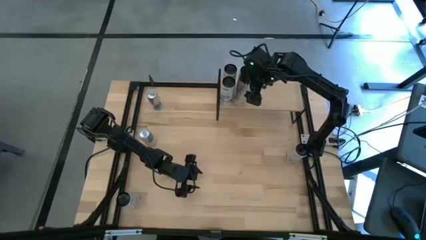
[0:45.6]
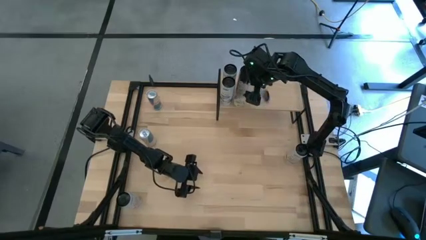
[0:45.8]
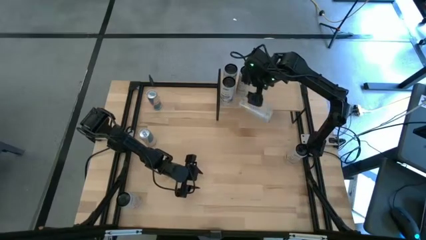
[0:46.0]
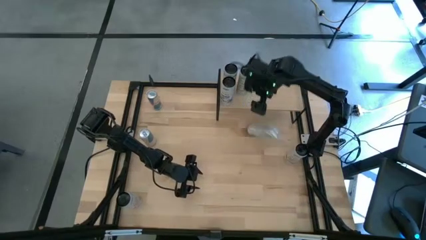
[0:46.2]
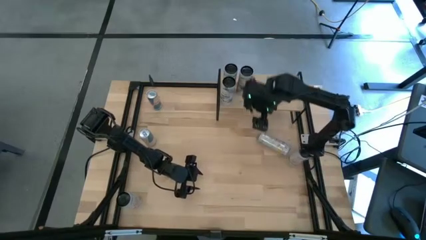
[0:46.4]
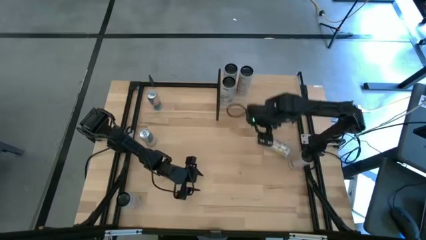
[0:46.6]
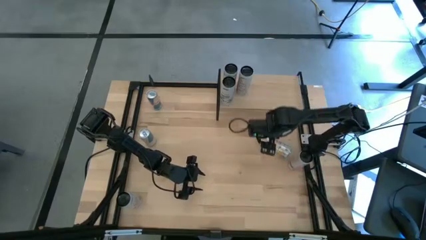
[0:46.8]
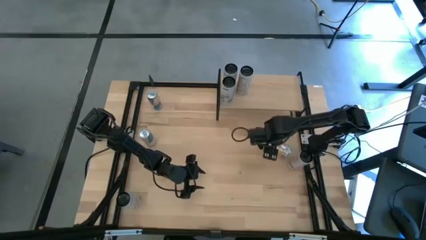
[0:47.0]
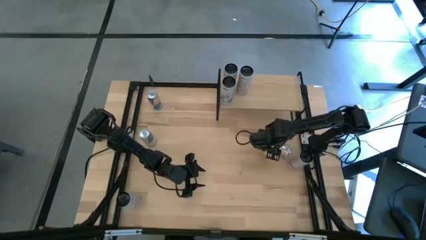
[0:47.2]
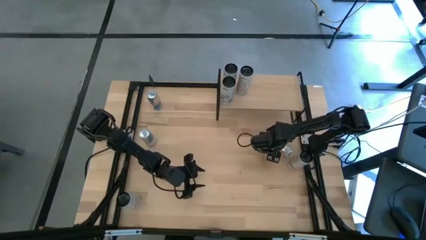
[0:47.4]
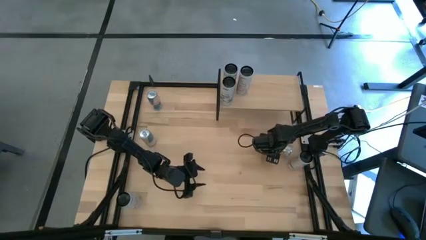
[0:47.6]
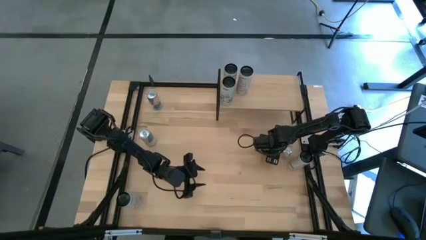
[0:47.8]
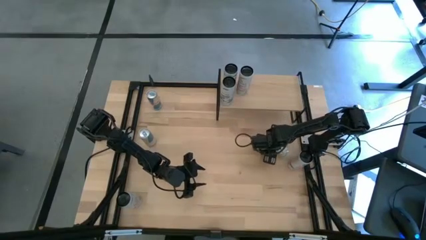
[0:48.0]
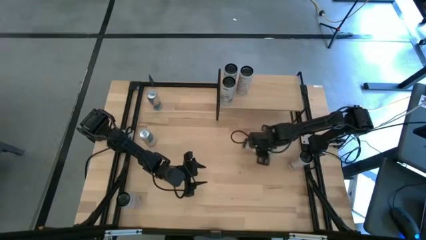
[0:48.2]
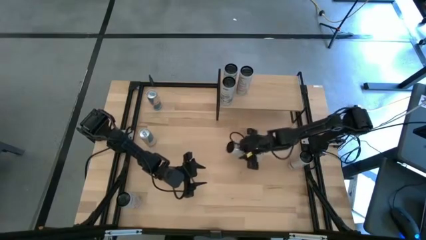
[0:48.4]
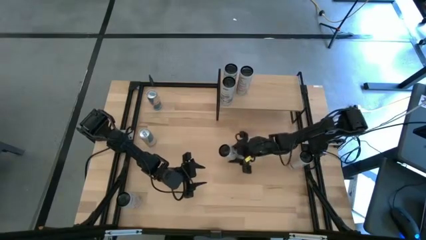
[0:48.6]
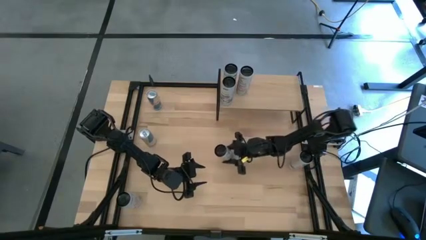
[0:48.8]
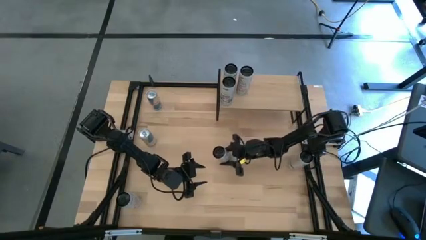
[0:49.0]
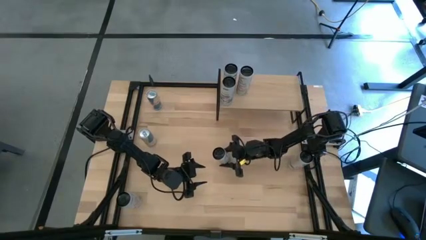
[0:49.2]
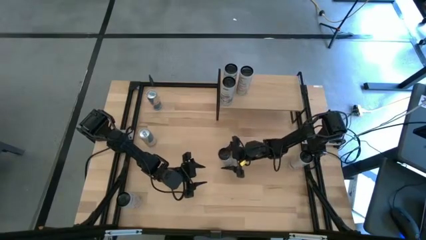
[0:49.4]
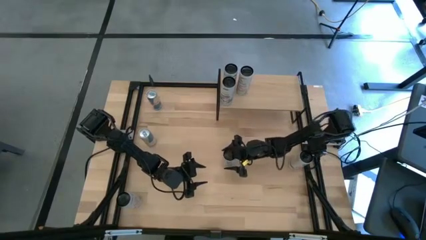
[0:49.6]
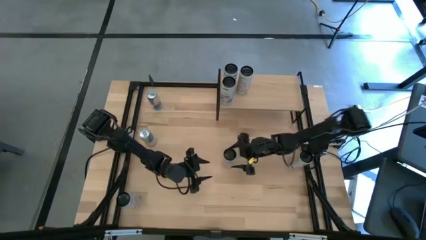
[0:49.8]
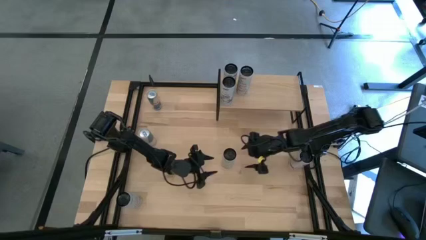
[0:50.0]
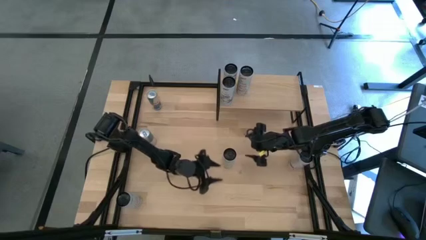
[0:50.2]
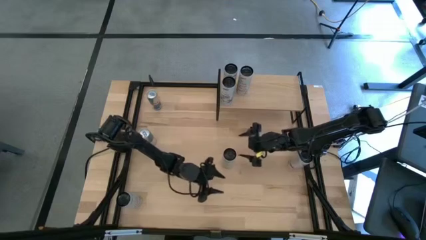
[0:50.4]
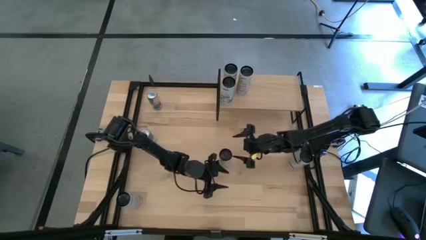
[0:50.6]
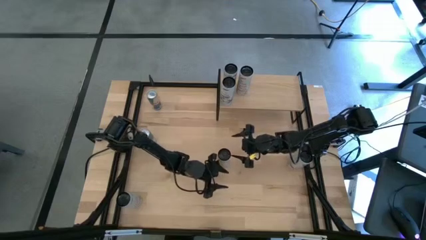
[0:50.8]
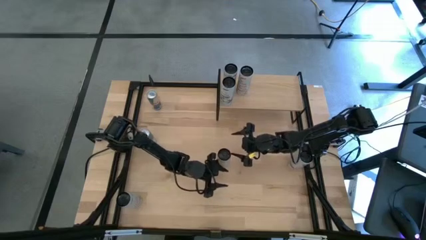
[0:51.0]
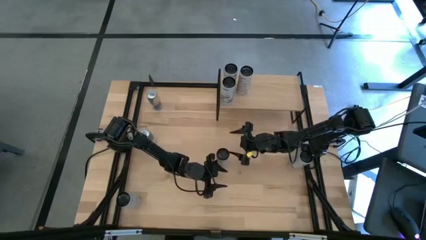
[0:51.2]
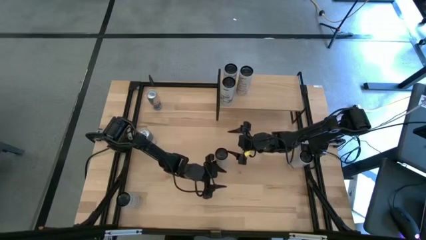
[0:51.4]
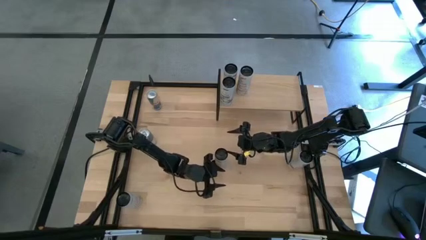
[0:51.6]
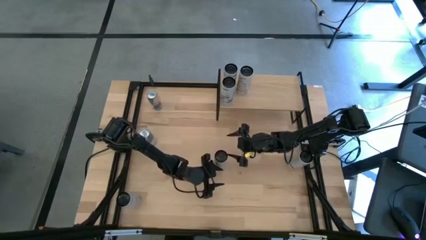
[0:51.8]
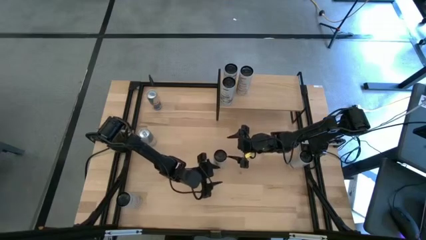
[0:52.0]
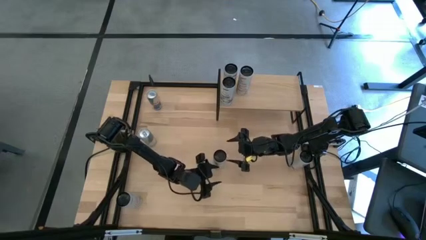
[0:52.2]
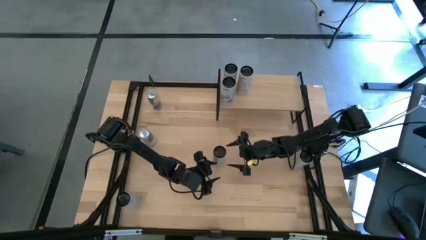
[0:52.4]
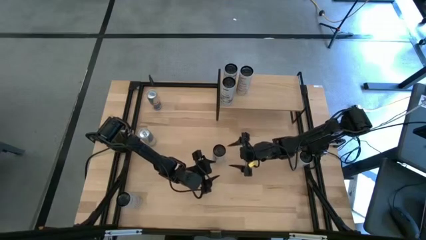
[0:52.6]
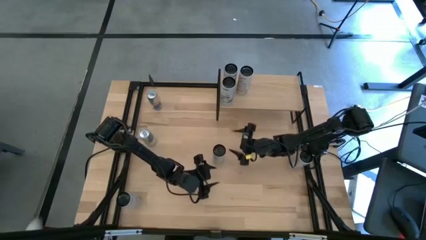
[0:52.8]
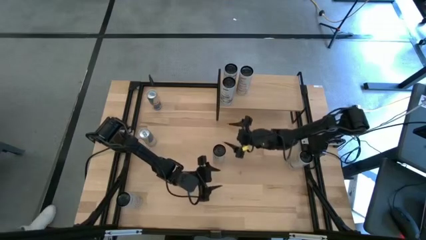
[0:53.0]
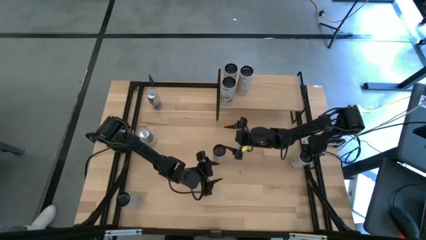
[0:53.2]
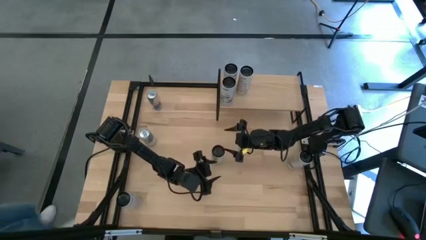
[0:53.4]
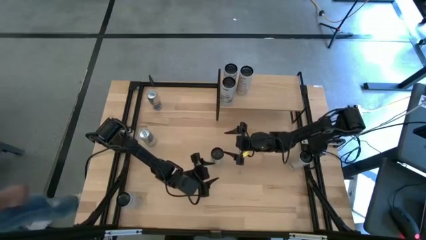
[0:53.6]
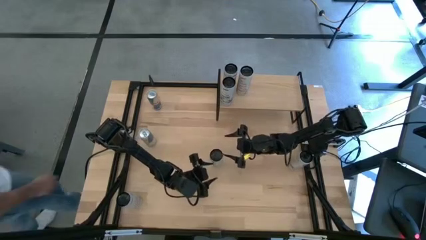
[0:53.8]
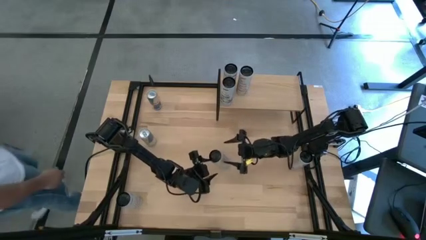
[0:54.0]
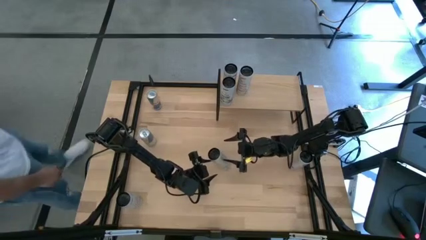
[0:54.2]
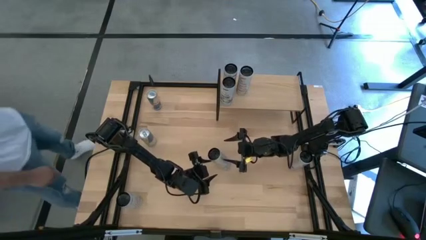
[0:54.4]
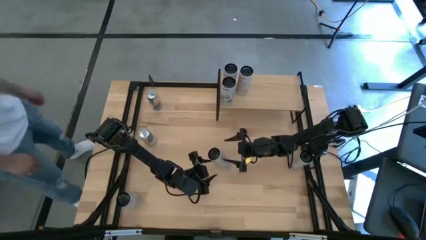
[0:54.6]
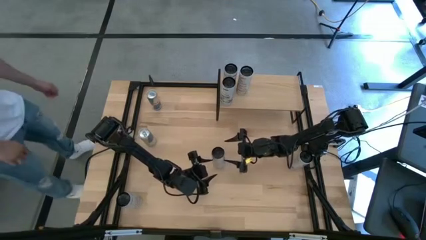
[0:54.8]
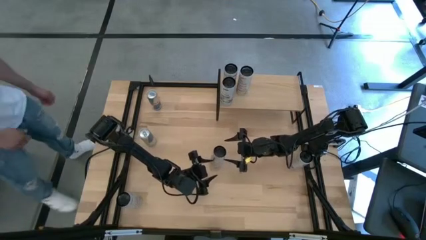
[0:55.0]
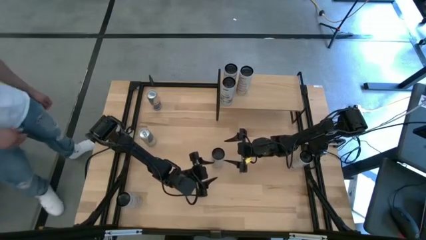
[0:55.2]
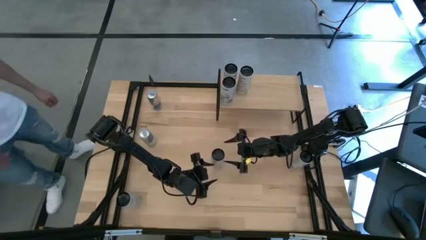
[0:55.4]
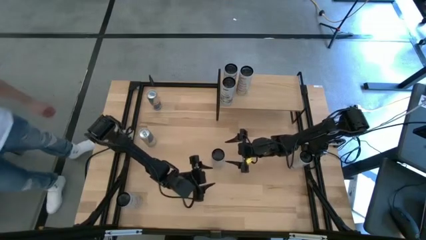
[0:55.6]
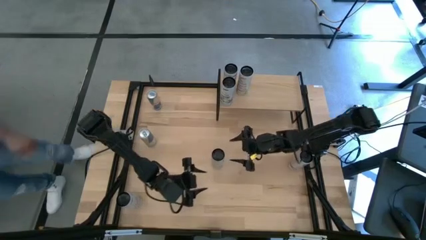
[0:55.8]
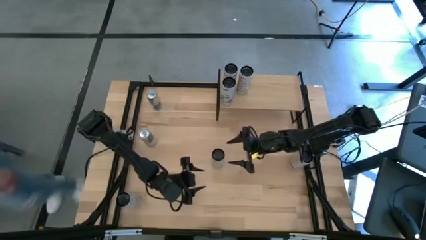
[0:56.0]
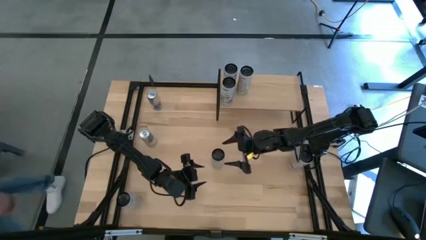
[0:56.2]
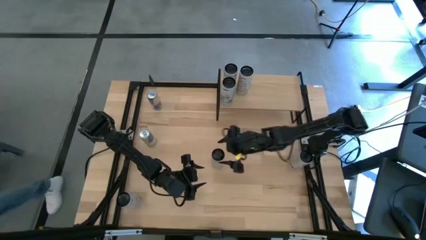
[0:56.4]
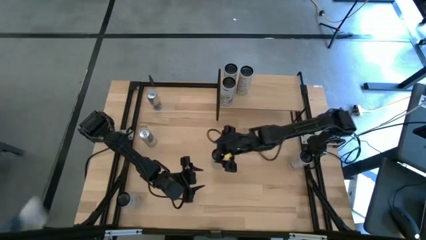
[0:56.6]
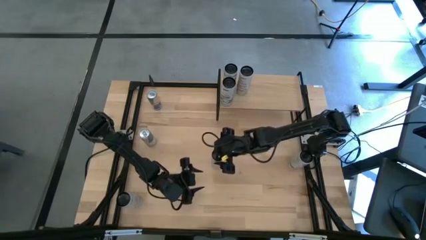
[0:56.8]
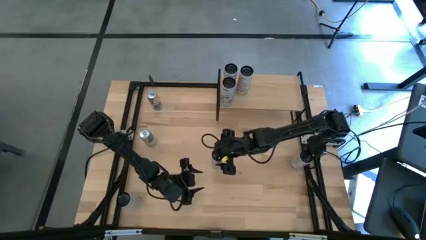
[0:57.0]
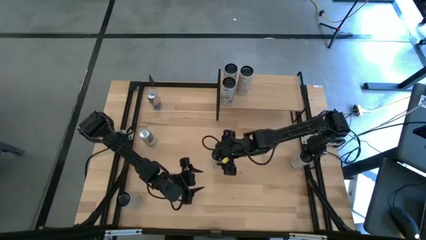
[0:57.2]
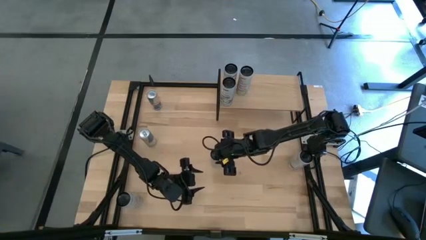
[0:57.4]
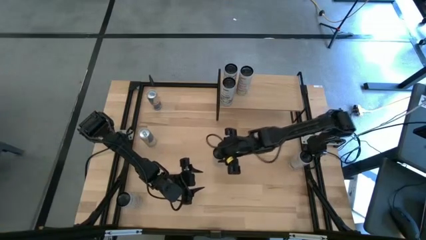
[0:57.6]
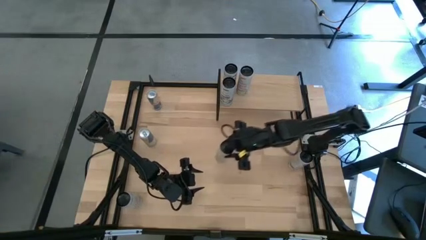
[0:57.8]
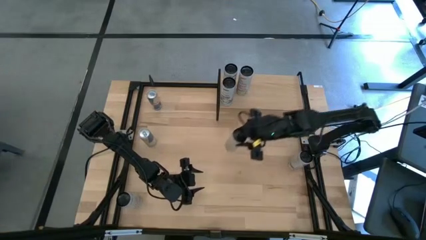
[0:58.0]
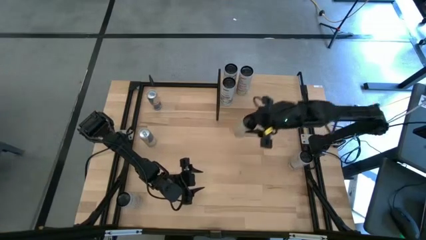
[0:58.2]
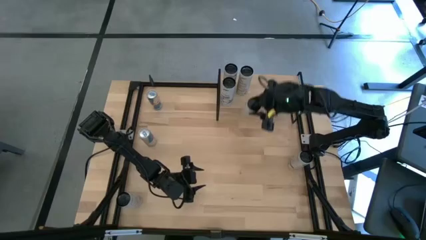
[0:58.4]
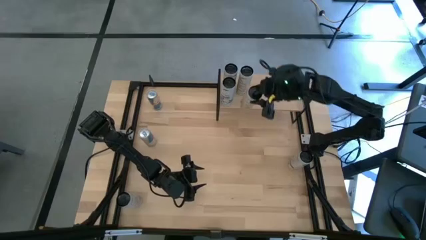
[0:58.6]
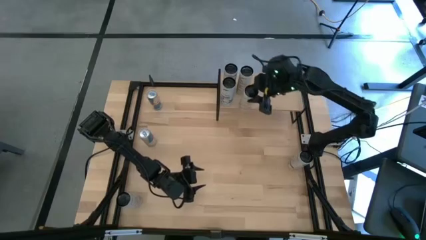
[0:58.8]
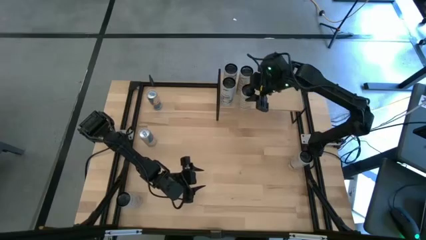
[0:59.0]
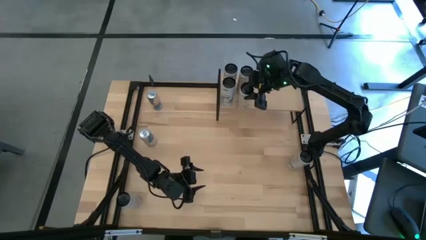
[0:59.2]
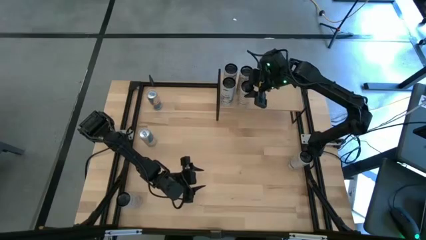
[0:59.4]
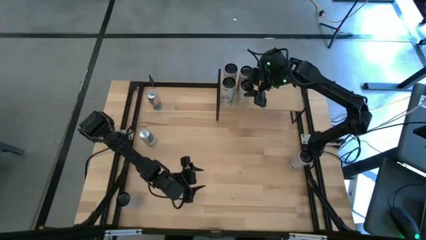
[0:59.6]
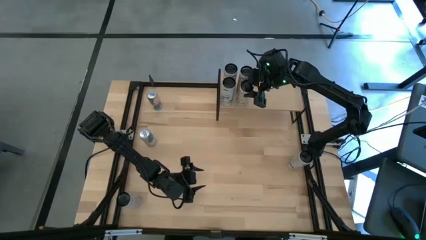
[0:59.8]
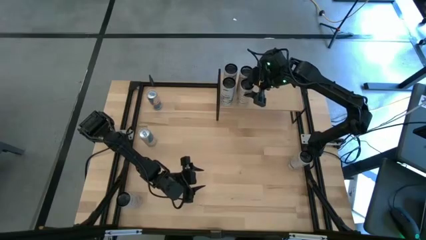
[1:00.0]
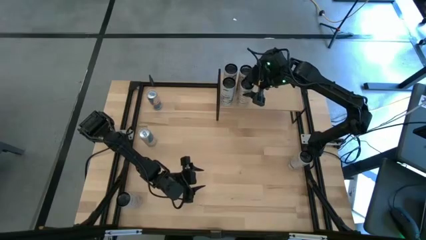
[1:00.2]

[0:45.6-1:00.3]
Task: Place canned beverage on shelf
Put the white yellow soda can aligned with the other white yellow soda can on the shelf
